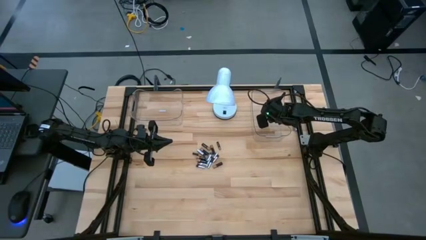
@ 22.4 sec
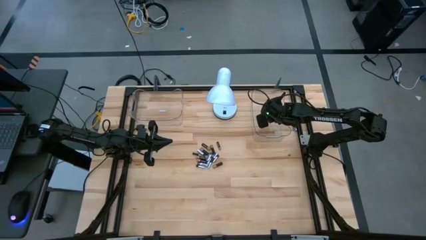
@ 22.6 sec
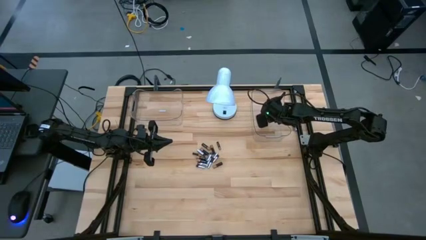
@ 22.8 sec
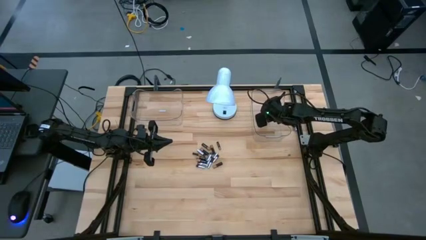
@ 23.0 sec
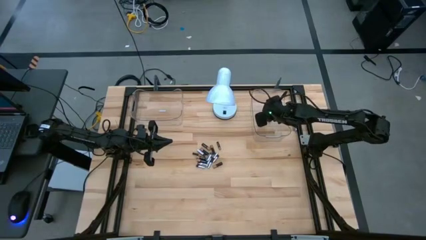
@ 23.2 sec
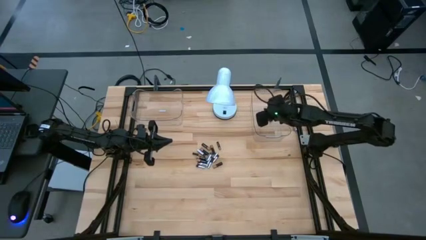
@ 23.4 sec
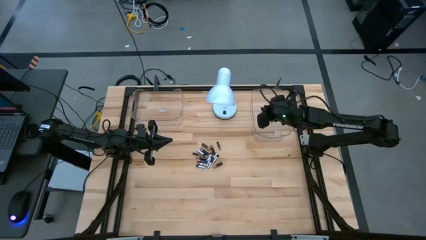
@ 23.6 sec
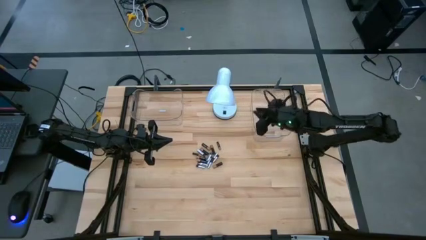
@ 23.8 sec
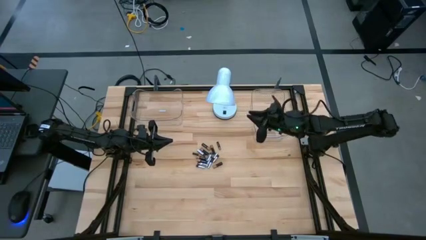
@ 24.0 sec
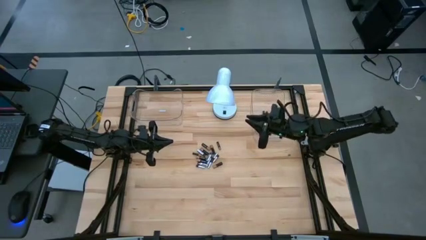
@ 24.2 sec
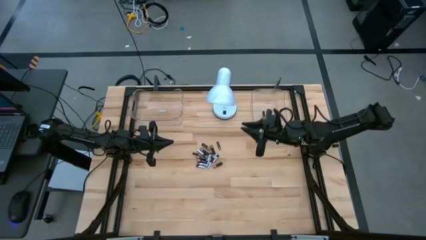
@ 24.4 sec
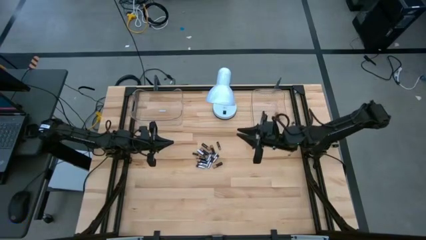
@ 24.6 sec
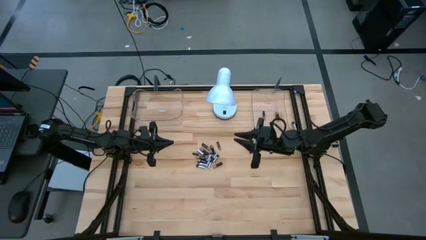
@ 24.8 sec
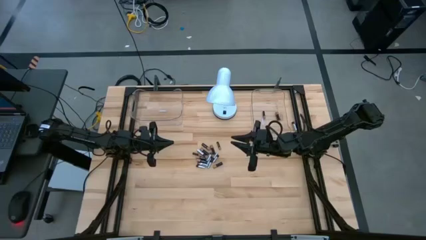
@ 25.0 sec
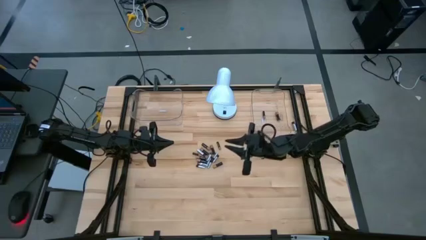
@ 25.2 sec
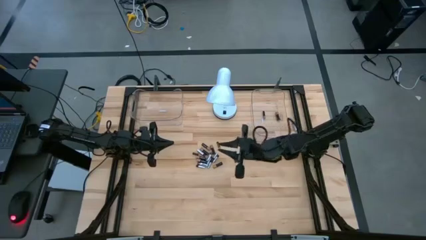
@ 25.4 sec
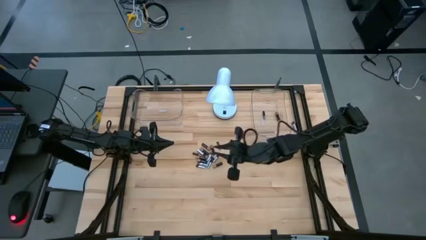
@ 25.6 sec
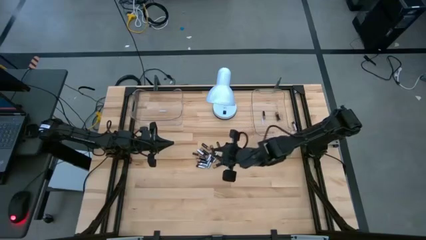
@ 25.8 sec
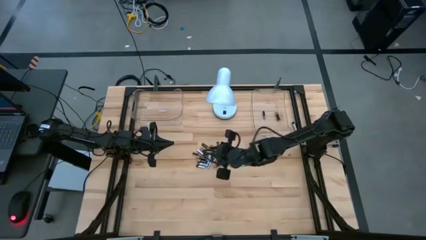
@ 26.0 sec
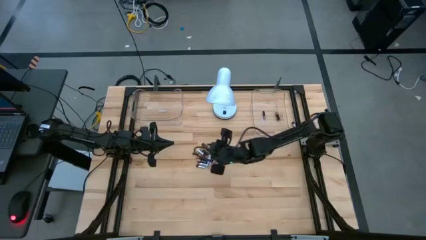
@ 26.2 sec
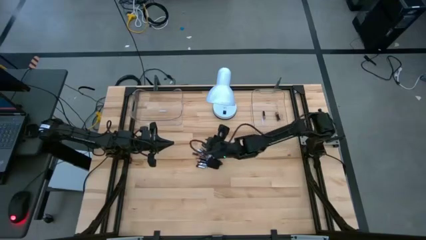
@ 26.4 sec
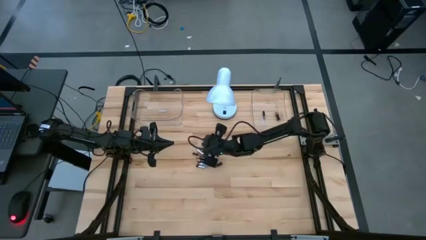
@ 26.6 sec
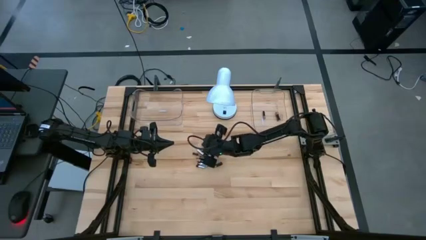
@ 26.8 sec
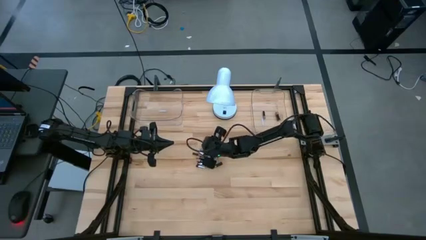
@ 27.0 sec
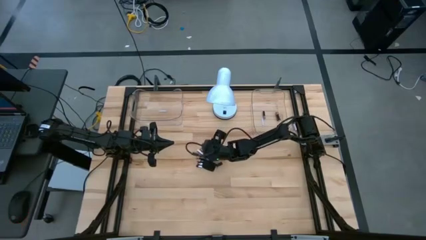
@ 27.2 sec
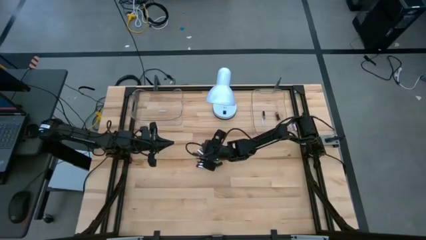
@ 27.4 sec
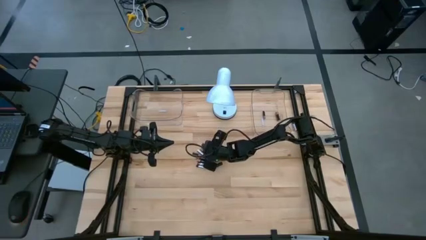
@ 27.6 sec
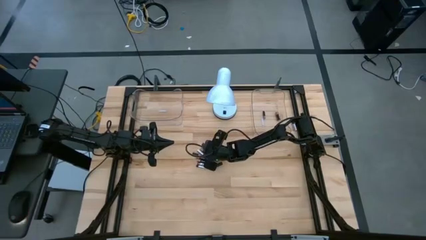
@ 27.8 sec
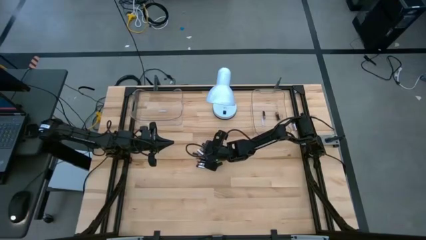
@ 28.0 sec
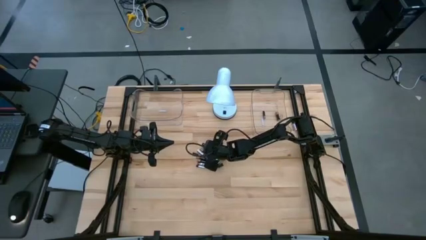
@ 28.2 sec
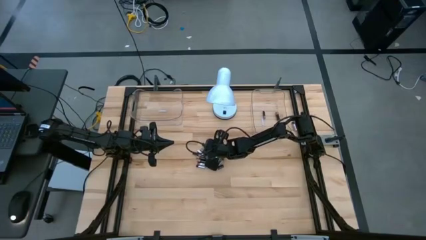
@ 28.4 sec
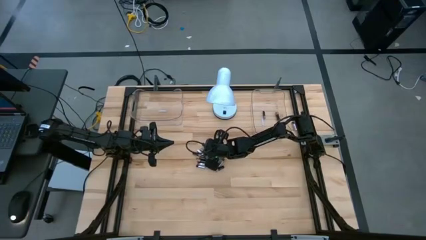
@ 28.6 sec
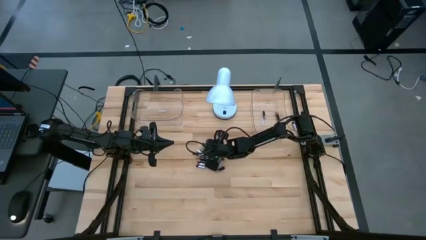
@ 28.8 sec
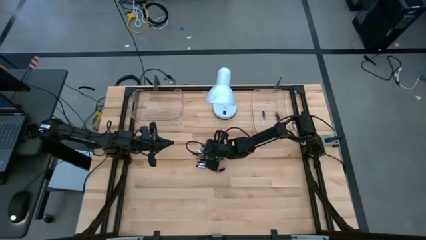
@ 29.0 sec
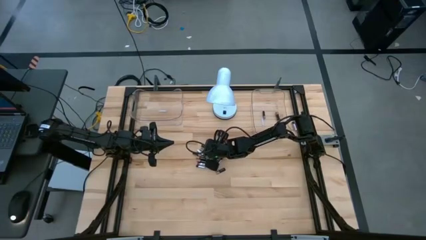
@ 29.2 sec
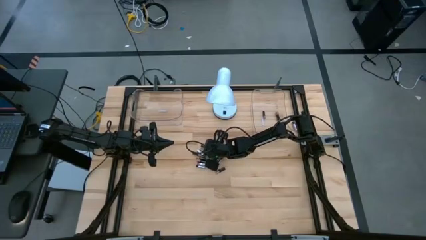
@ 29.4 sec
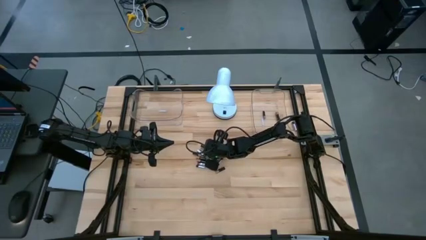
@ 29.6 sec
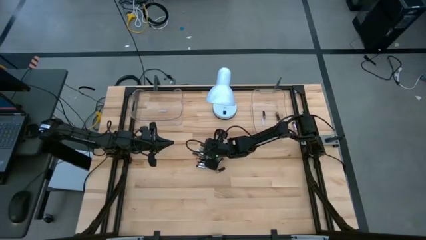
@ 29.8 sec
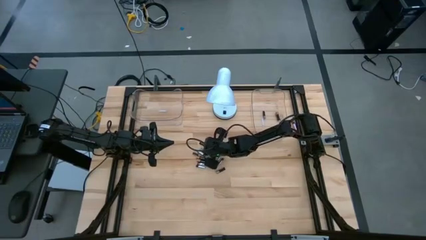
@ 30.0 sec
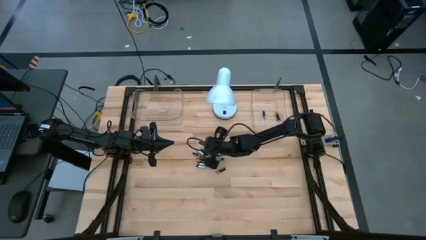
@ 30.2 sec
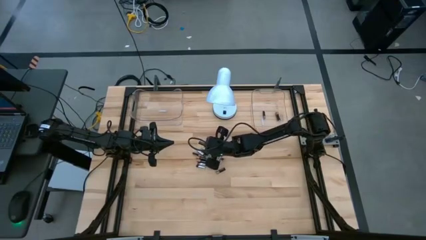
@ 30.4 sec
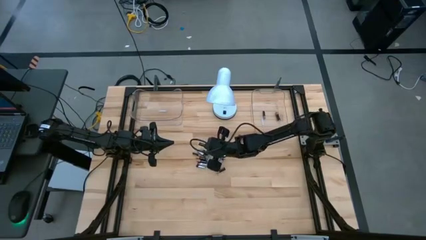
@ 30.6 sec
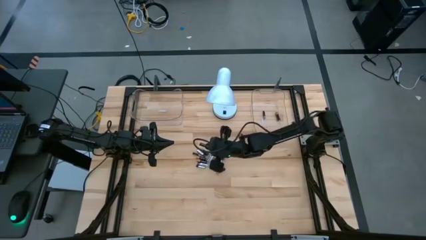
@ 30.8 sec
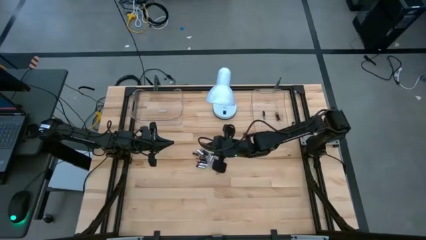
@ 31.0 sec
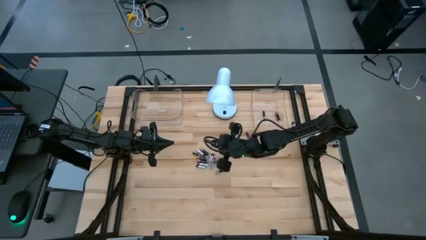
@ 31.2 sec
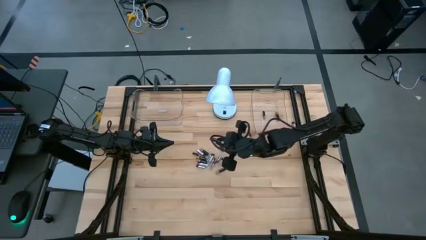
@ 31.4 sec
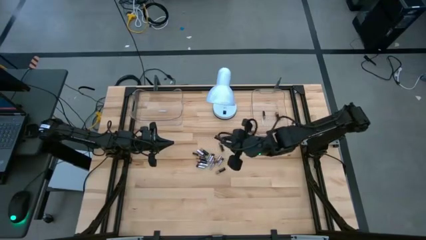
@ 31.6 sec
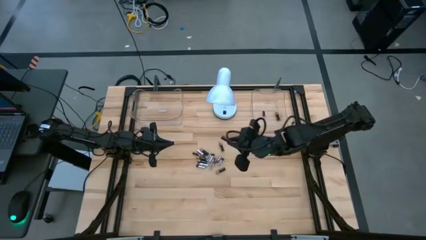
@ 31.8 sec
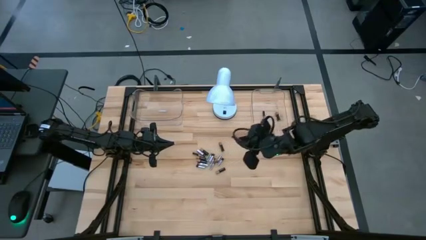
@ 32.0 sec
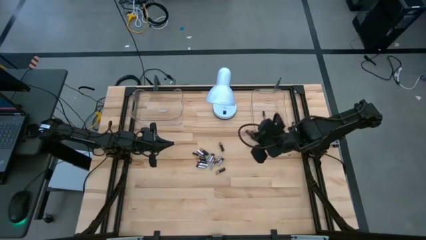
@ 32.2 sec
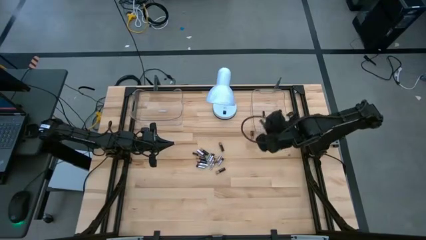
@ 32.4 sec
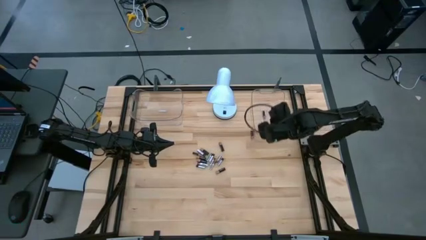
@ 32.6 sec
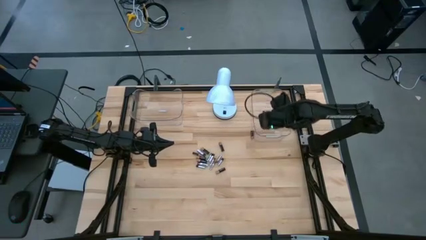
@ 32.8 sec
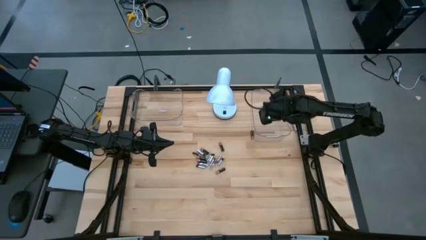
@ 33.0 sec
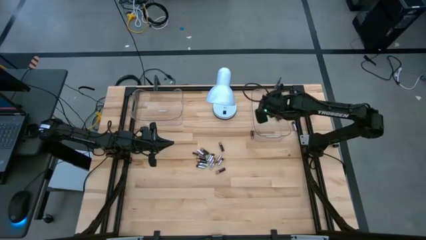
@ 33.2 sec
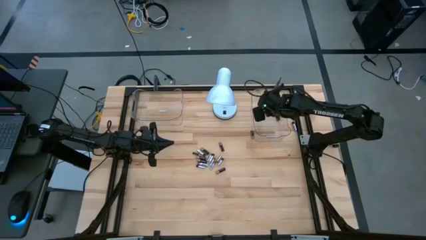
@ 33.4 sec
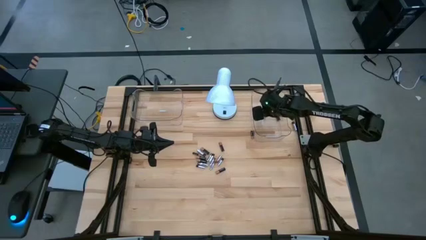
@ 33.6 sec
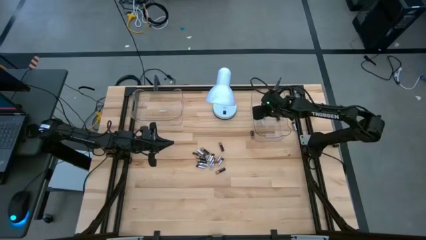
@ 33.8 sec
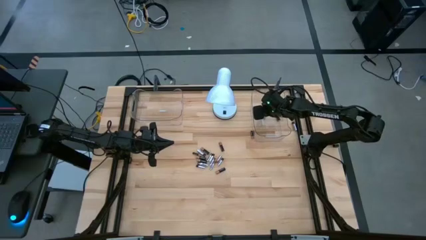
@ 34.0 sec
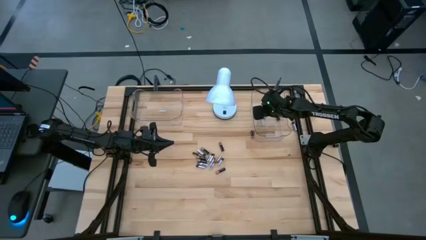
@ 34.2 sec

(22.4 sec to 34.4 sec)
Task: Sort batteries
Put the black battery in the transparent bin
